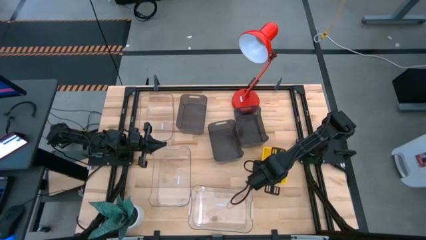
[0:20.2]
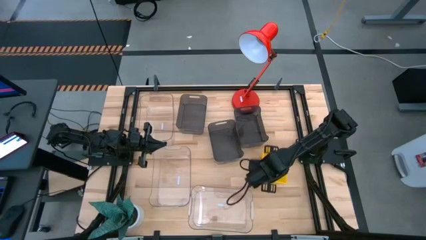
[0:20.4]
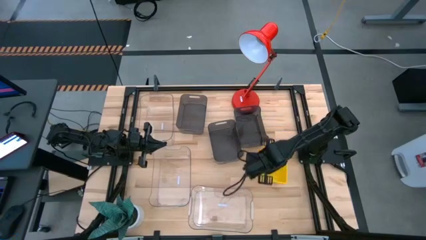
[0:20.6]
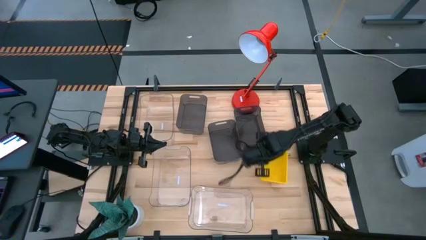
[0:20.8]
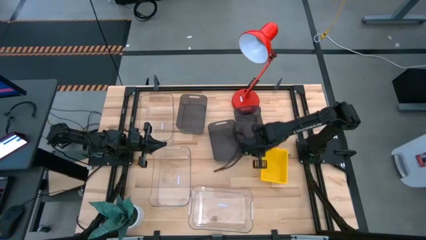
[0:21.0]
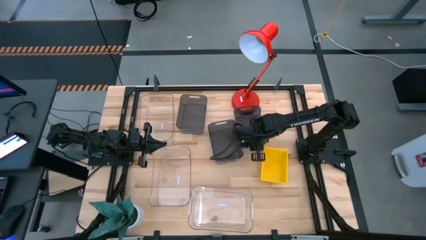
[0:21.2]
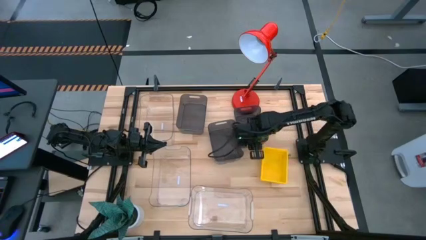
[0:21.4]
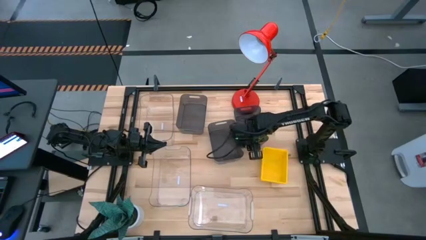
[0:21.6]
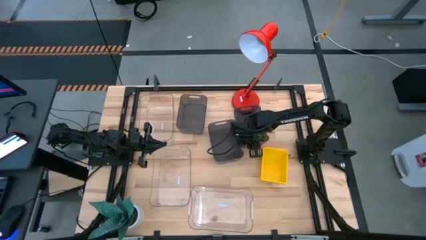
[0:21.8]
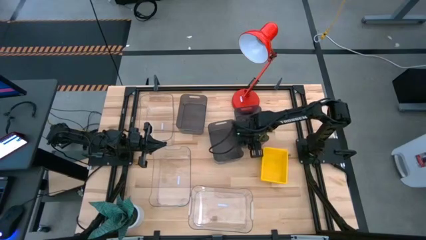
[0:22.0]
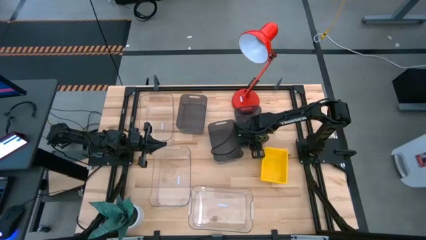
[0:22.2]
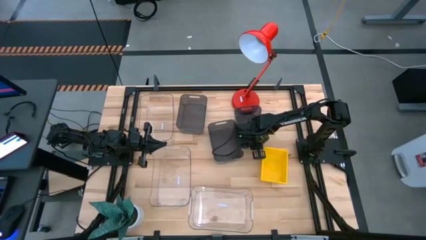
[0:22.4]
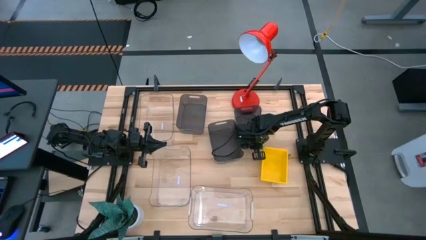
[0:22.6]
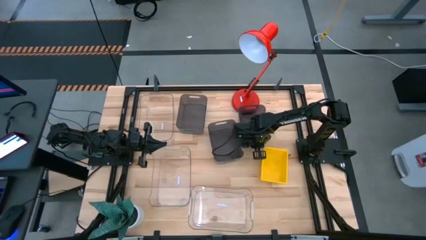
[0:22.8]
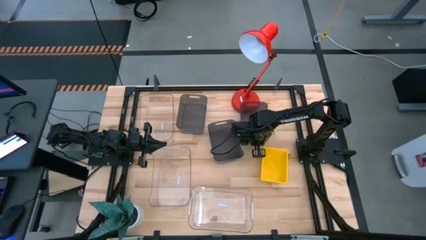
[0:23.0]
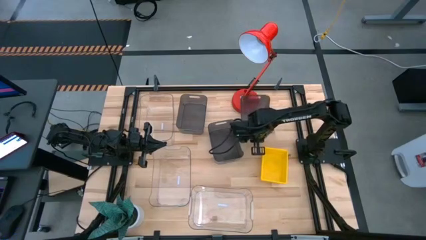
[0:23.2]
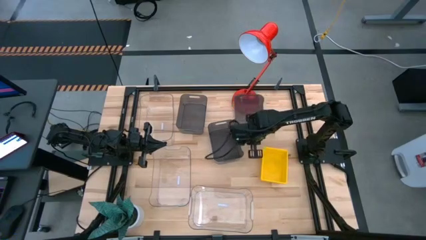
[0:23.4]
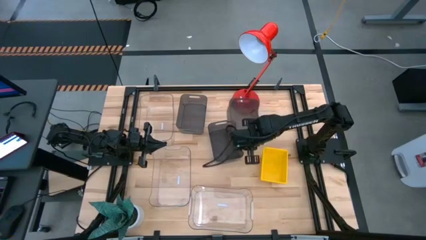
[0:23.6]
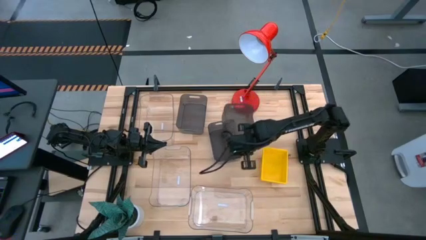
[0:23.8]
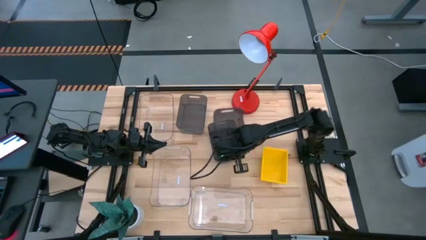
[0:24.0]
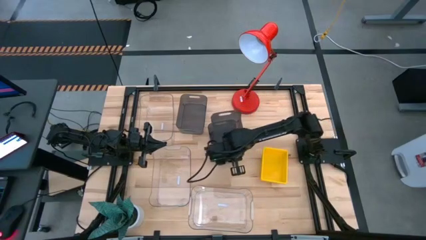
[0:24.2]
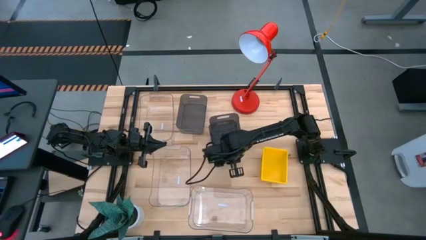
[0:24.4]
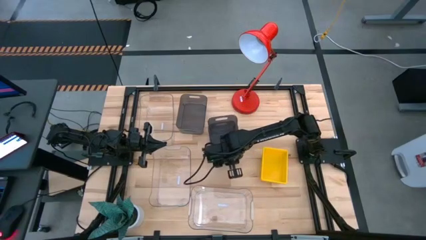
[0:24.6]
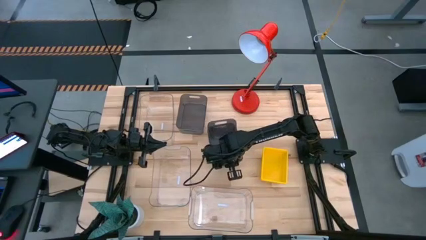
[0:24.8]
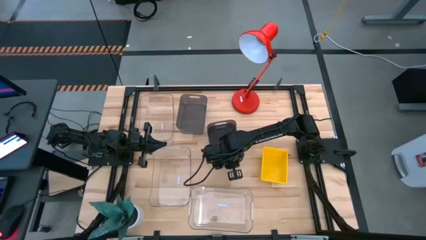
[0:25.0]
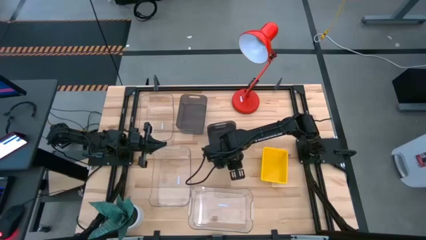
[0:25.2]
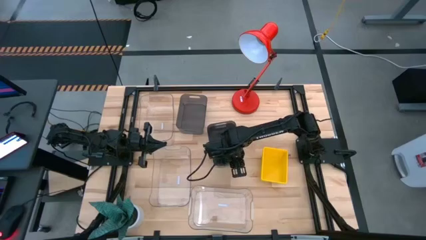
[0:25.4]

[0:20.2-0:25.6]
Stack the middle black bin on the bottom black bin

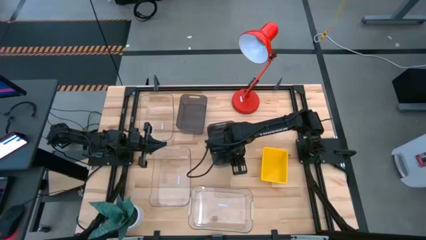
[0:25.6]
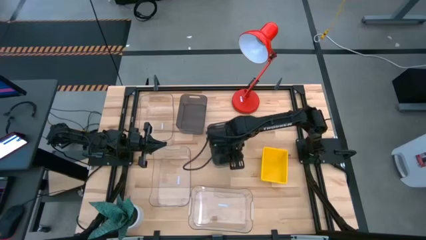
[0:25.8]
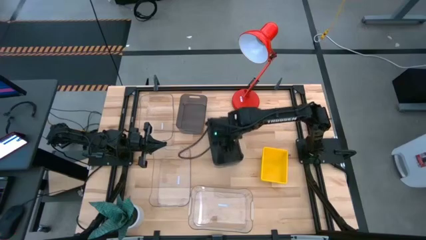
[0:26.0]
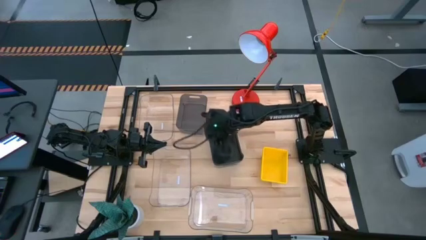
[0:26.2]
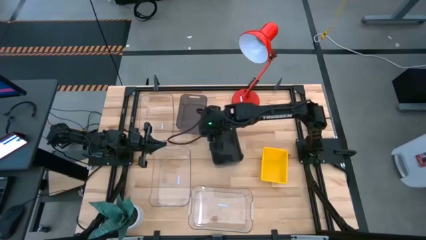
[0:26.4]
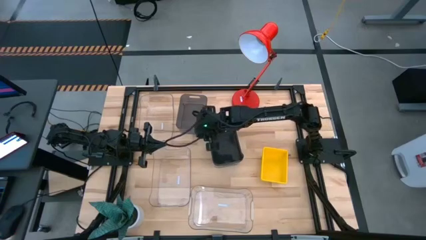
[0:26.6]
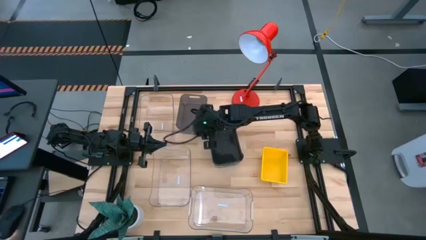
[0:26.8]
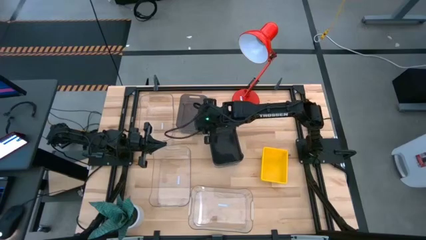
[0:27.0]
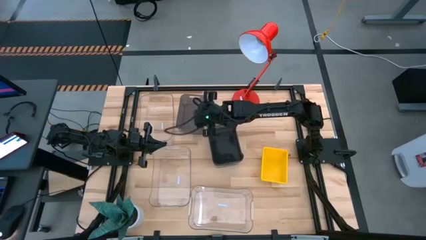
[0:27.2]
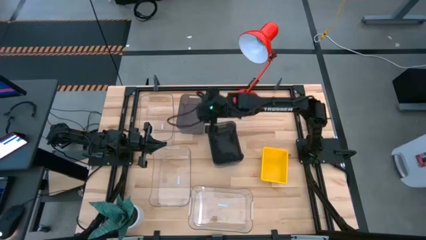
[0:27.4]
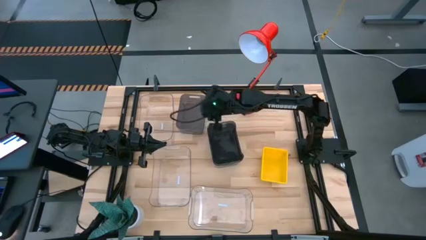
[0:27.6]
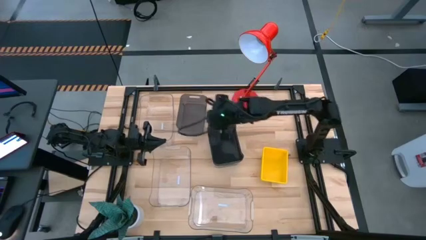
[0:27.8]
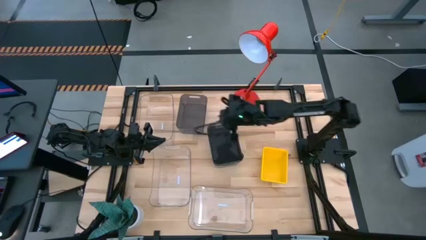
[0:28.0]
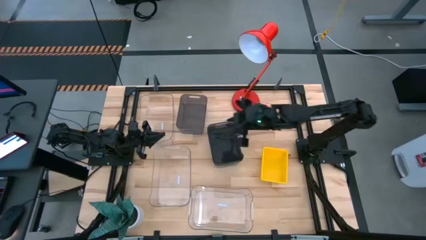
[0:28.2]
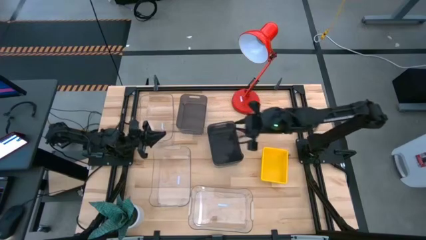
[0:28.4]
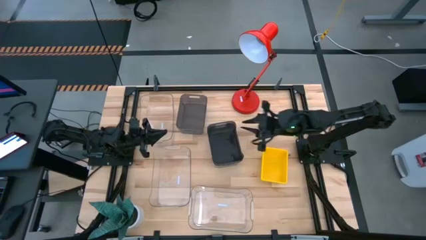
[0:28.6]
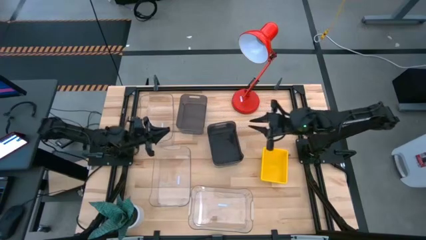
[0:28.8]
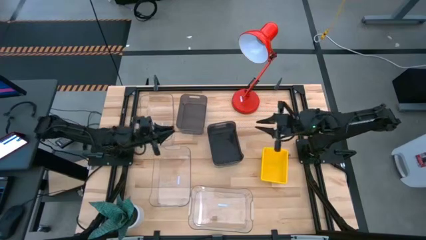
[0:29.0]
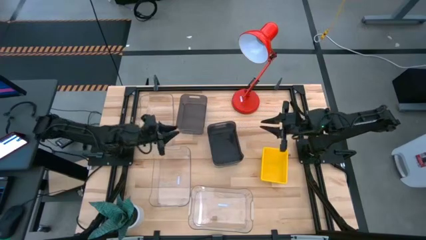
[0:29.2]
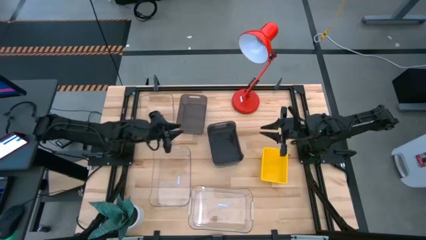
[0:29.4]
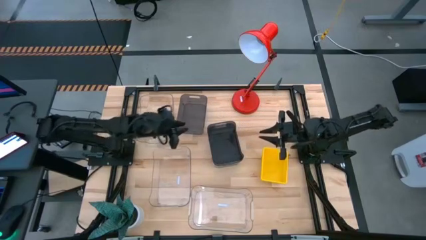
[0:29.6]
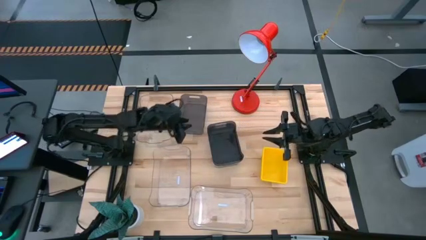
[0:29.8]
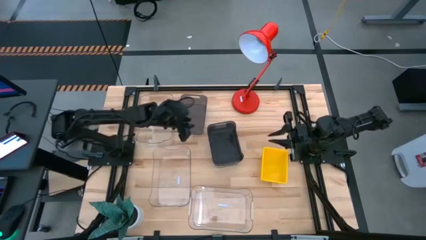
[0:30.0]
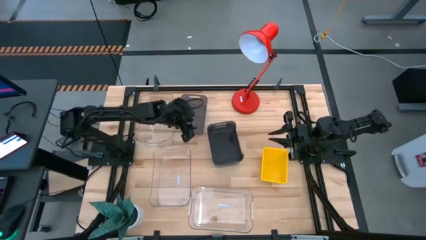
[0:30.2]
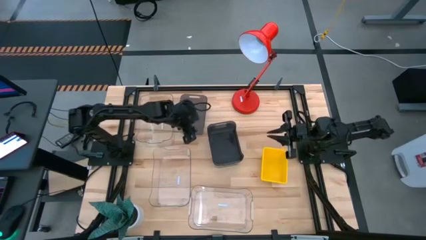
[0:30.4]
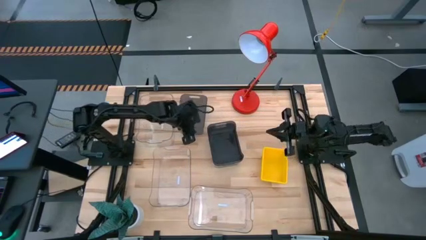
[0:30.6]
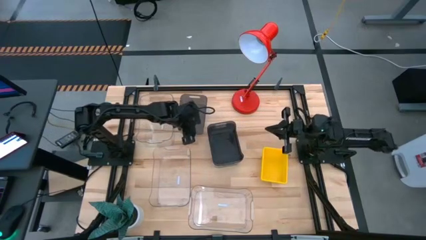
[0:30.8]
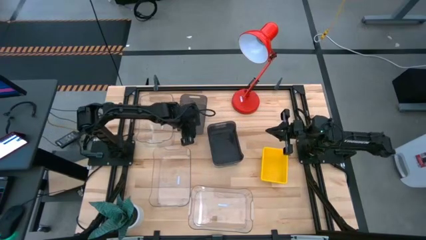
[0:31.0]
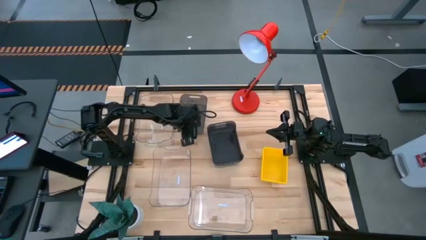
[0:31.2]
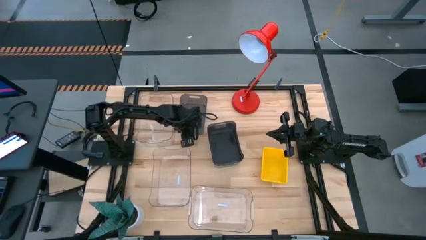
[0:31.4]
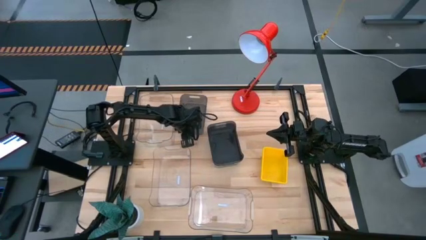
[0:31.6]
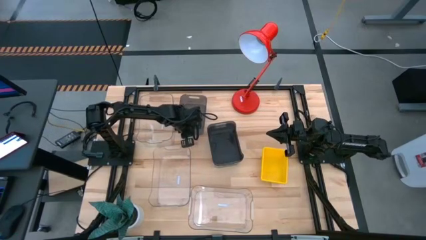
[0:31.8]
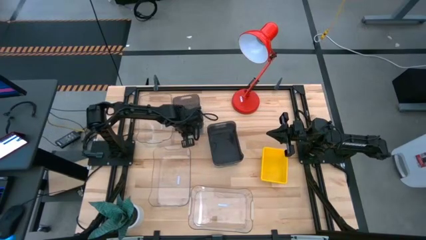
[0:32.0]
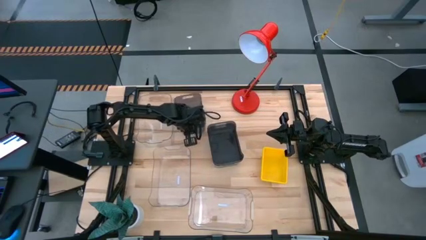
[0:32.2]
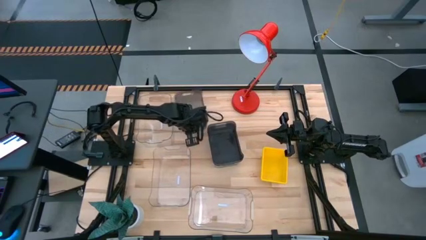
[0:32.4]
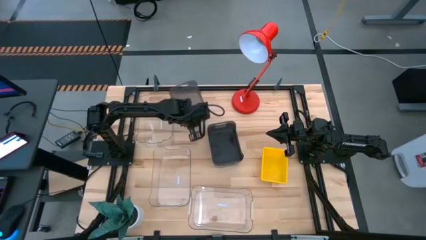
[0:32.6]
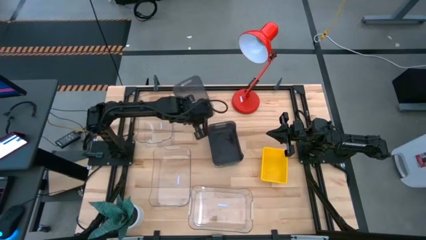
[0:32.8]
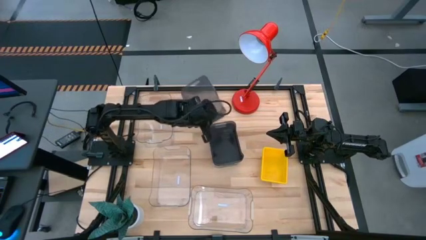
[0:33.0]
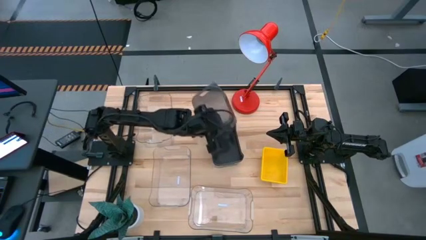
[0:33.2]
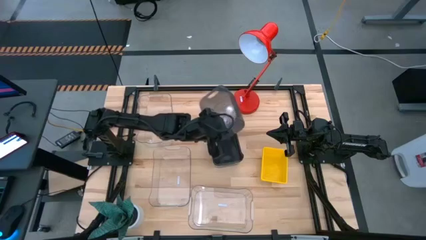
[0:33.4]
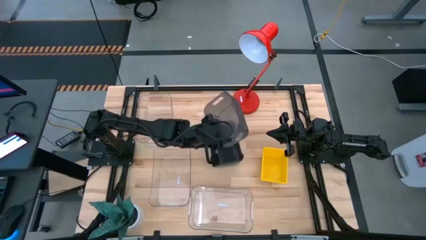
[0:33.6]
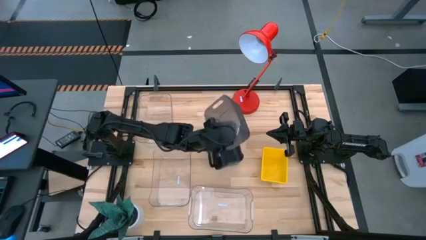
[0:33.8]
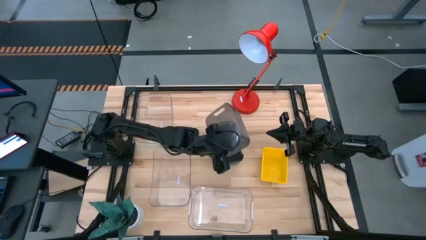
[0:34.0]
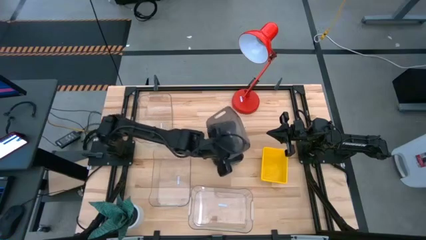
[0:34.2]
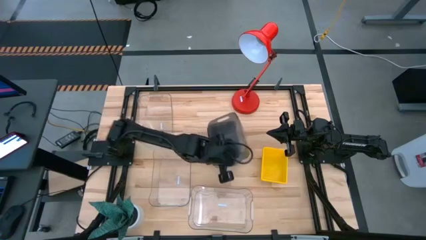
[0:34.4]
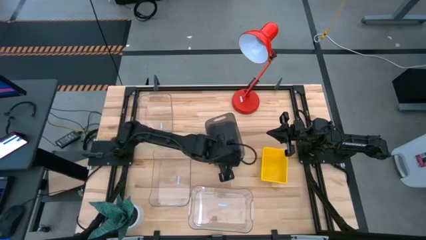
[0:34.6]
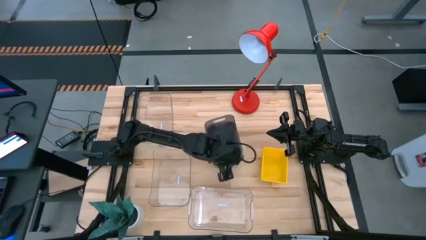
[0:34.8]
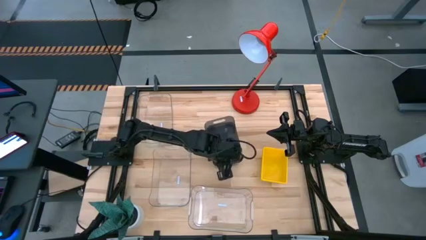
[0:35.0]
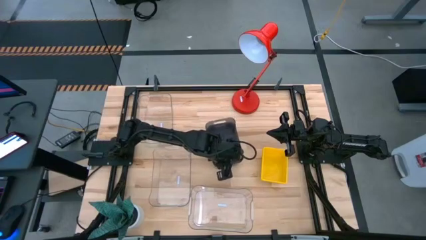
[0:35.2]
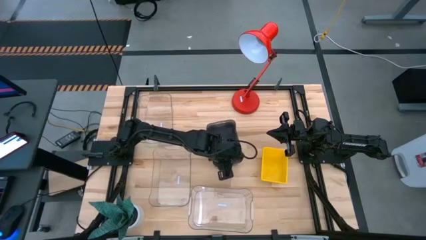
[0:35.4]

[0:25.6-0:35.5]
Stack the top black bin on the bottom black bin
